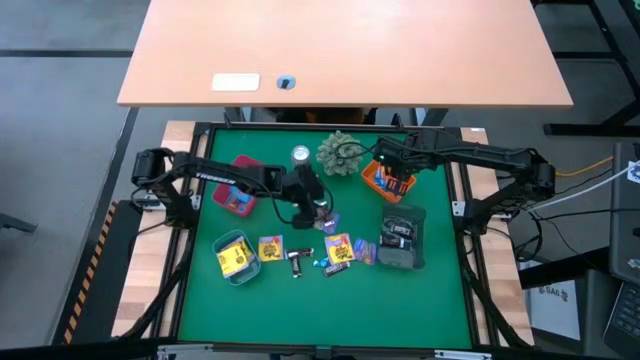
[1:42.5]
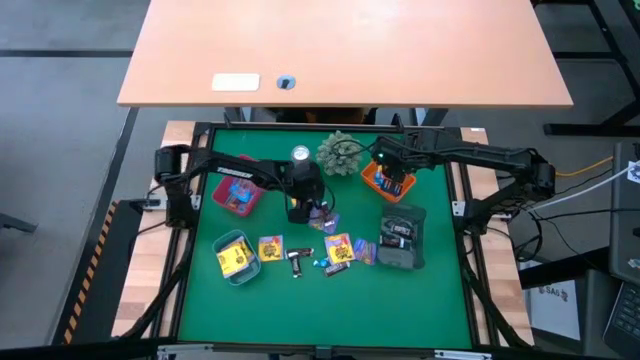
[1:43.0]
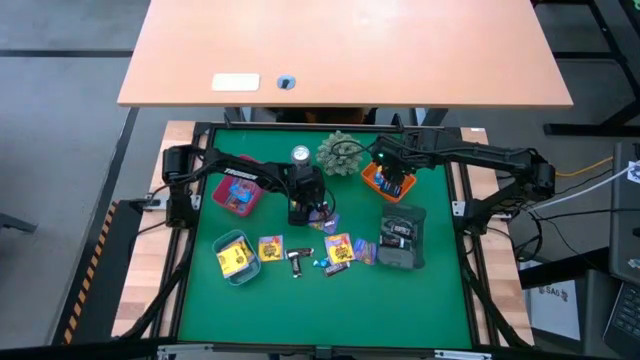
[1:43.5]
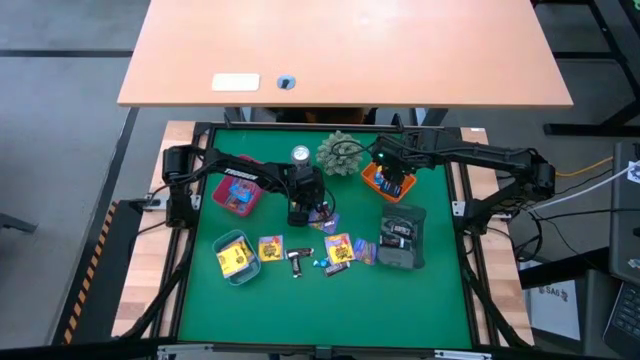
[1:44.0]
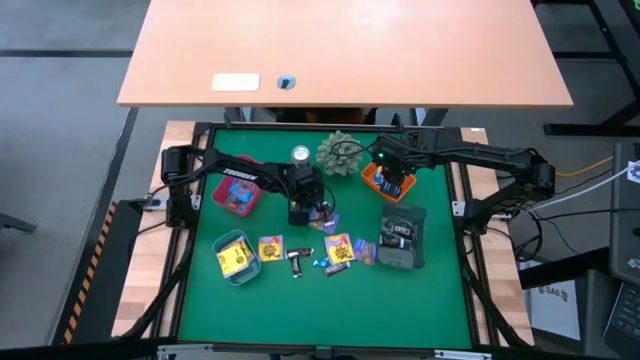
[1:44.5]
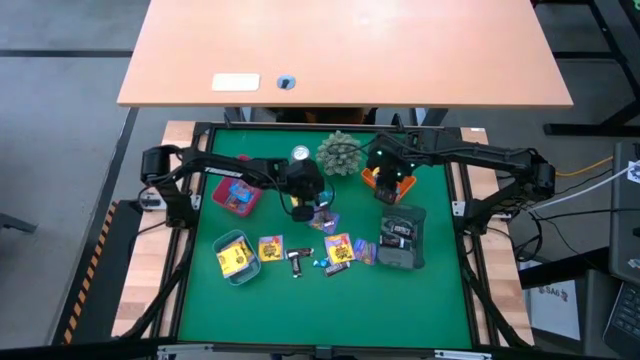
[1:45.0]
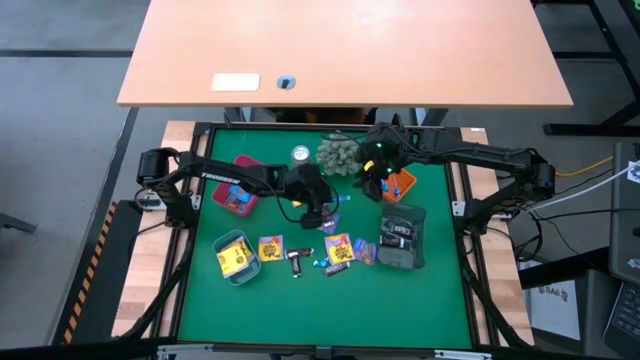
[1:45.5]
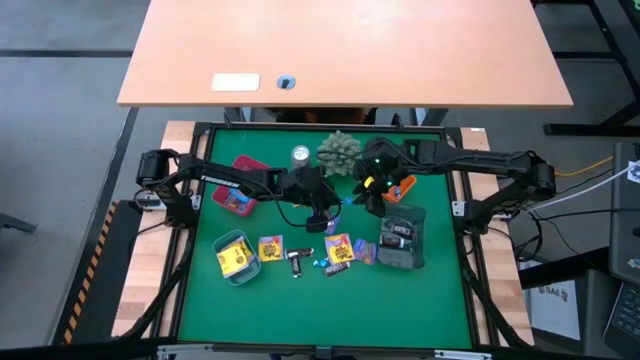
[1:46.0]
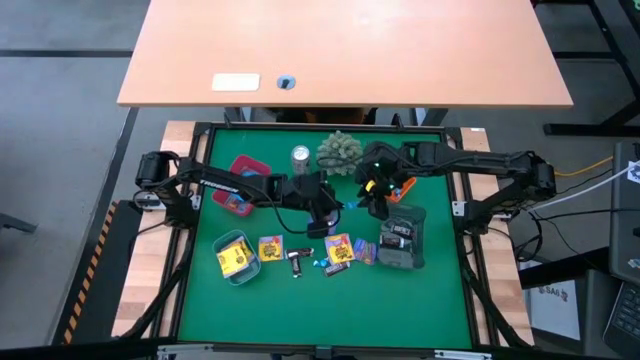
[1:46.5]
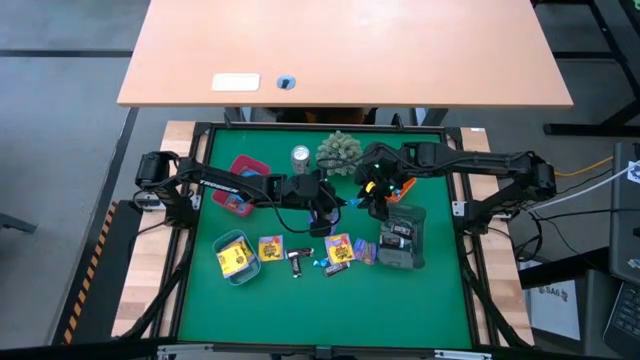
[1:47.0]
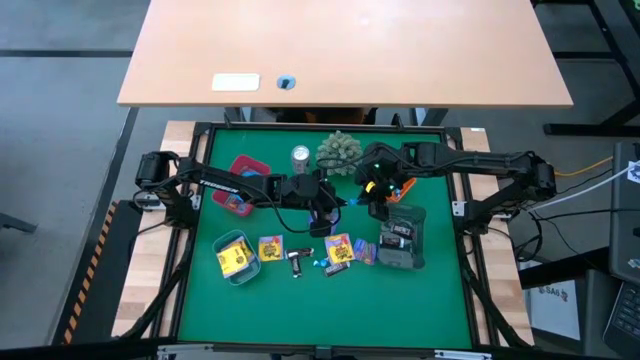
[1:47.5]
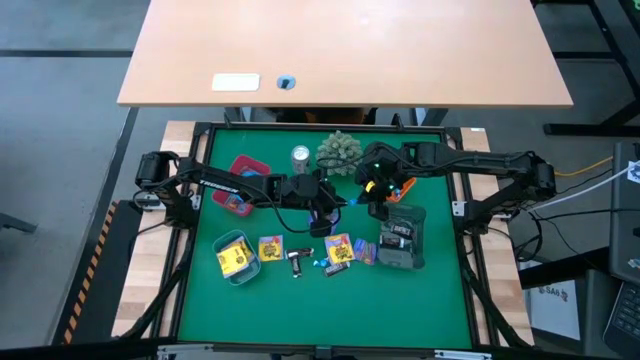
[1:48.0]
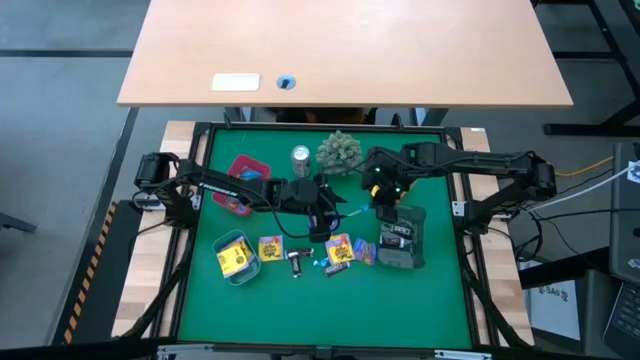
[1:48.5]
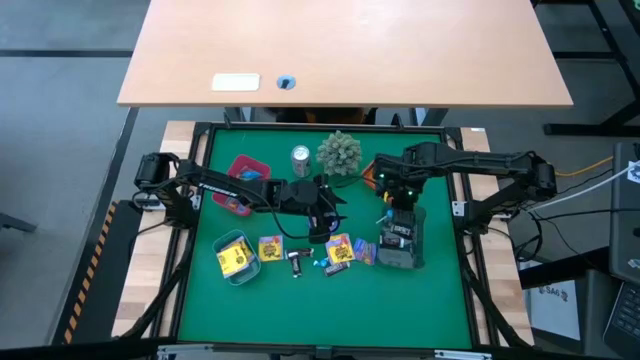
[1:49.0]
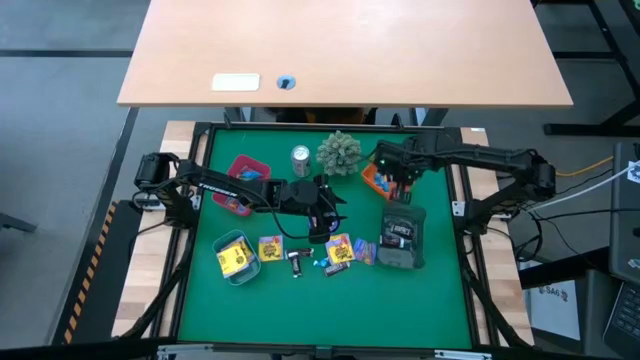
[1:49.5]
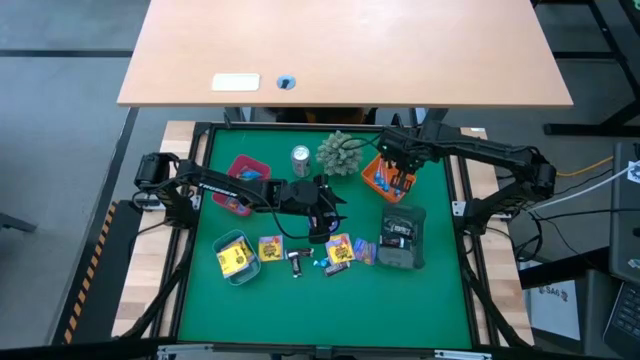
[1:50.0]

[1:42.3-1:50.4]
Task: Sort candy
Put the blue candy into the orange bin

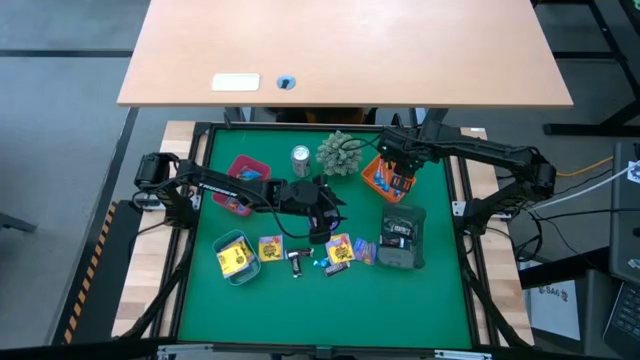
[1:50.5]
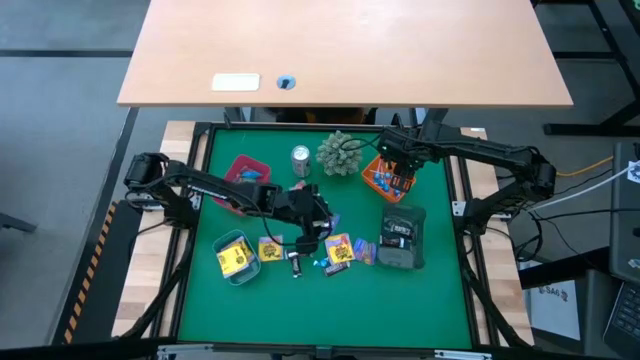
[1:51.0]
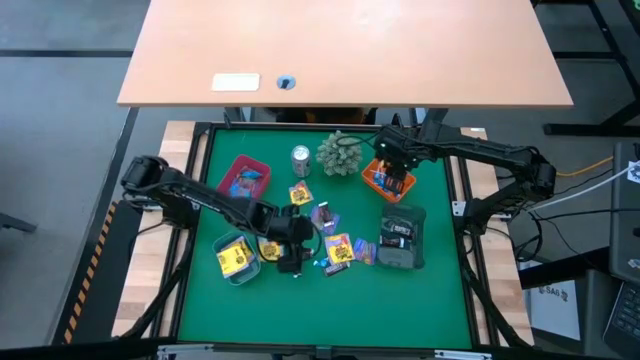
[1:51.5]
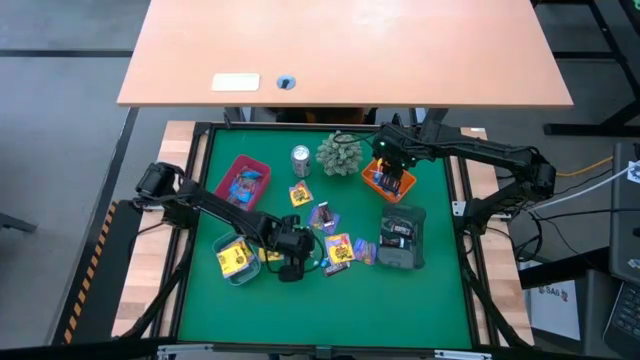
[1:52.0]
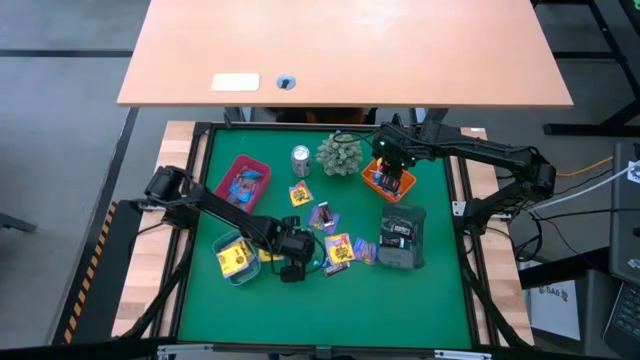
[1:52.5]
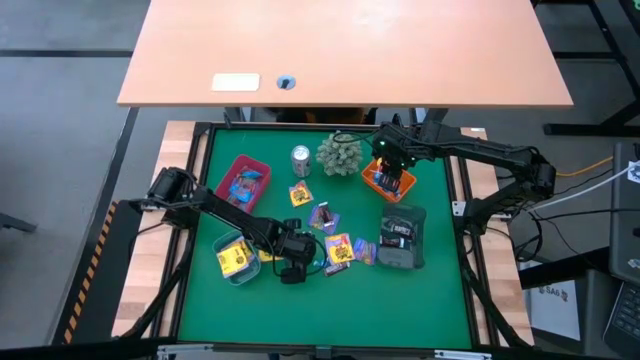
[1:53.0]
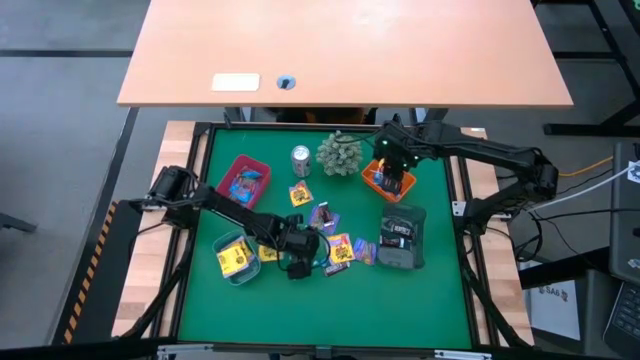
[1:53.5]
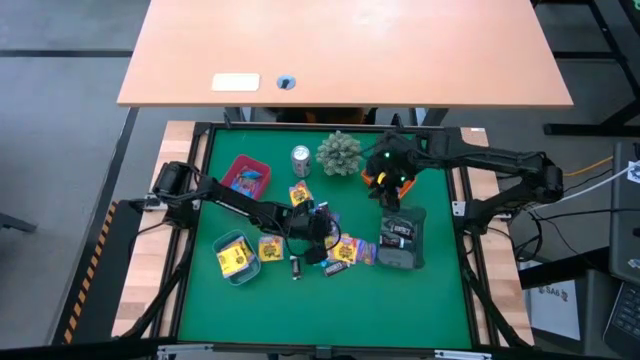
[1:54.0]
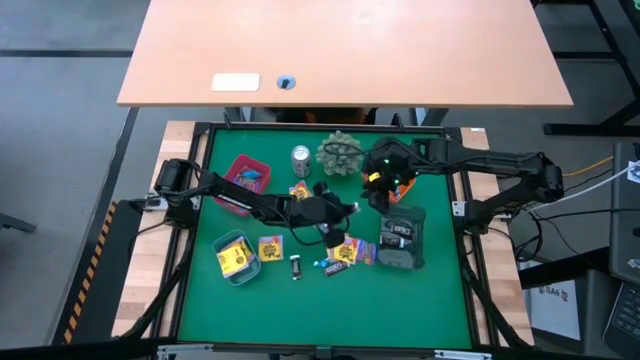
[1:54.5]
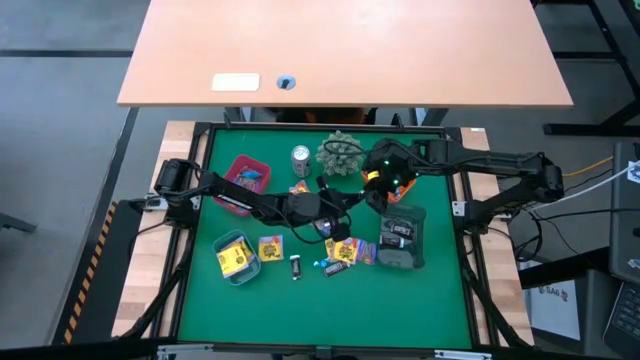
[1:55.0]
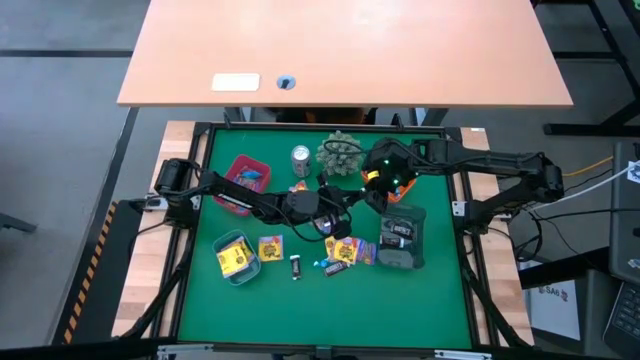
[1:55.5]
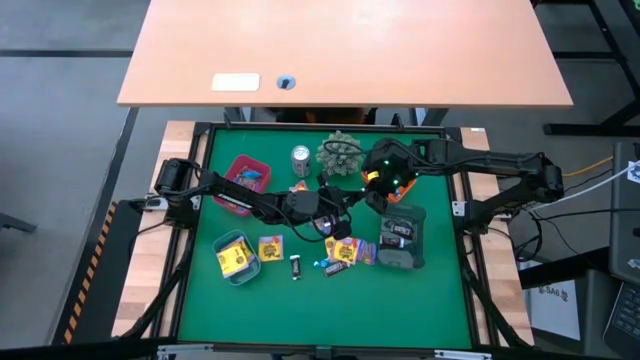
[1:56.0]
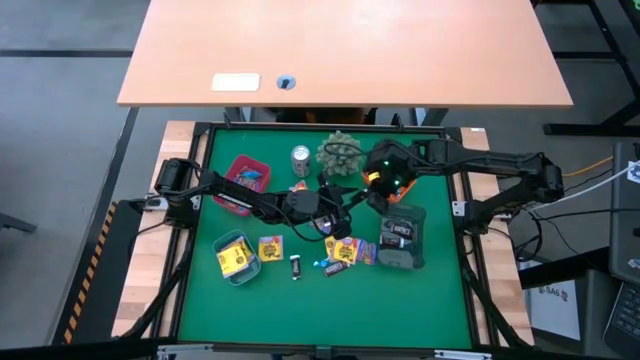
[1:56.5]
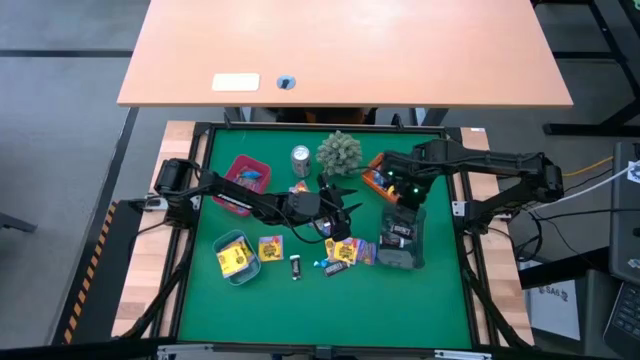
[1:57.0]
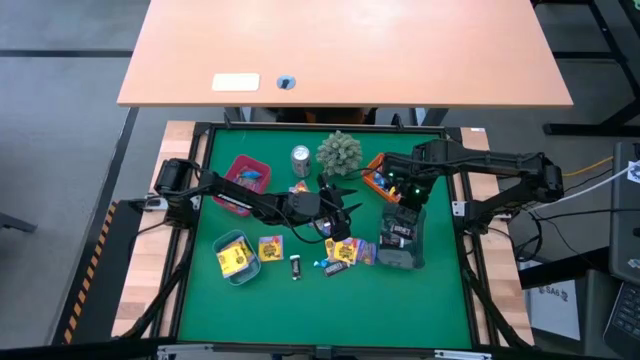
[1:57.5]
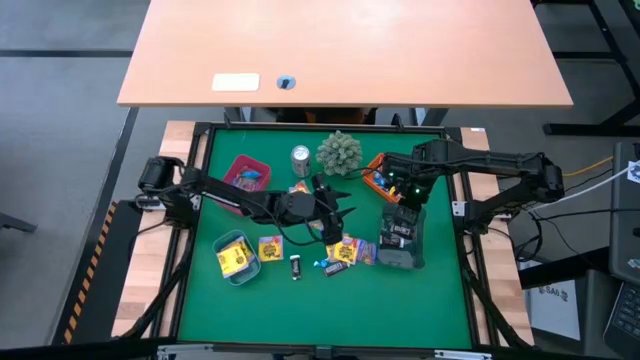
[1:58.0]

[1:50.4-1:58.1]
Put the brown chocolate candy into the black bin

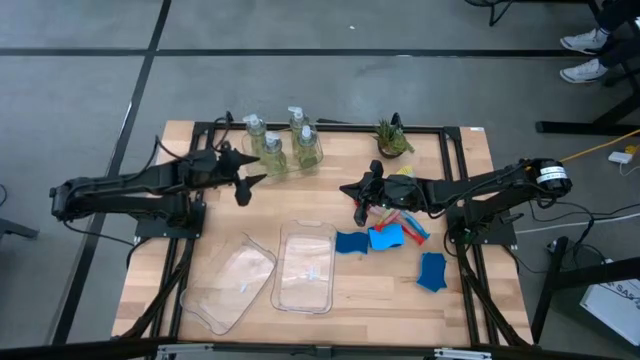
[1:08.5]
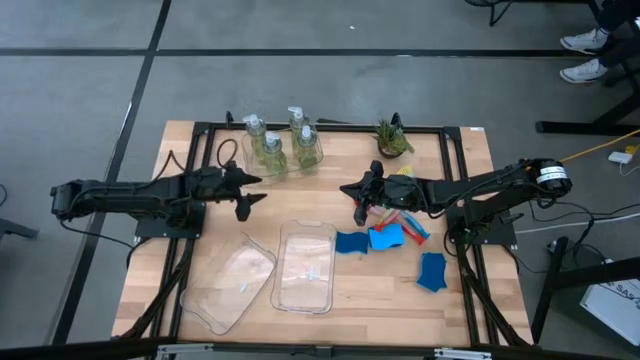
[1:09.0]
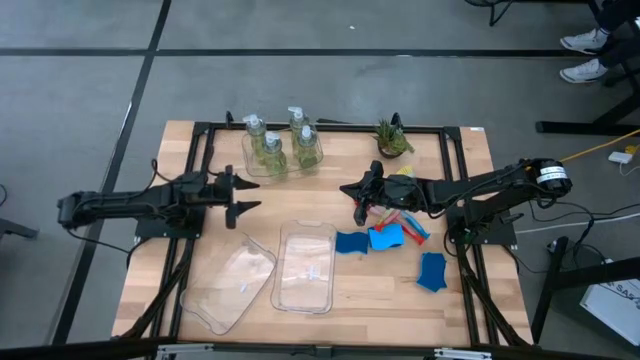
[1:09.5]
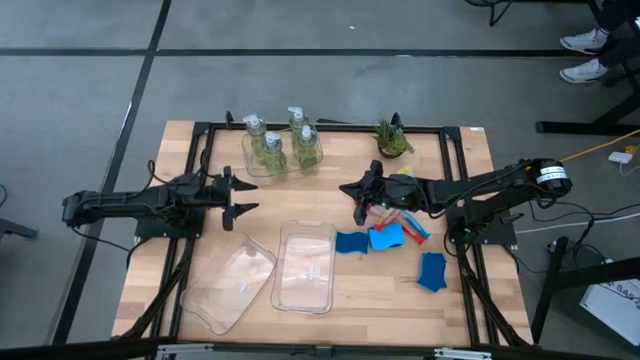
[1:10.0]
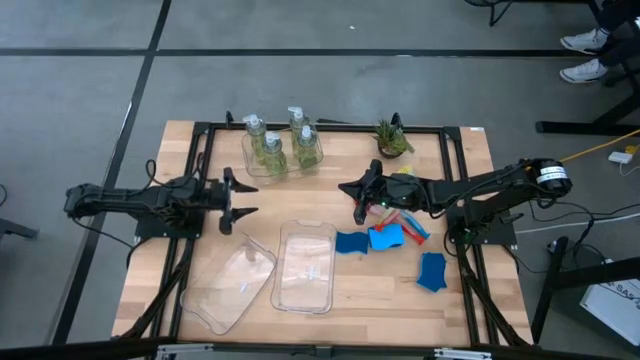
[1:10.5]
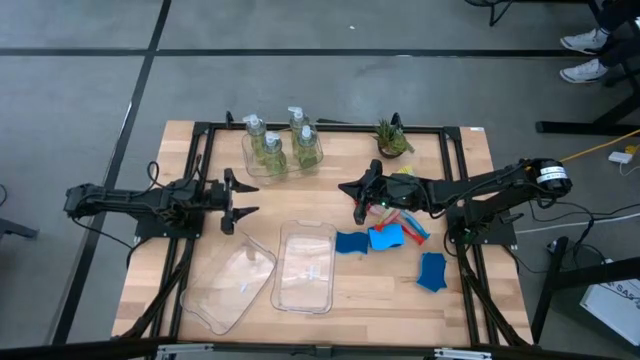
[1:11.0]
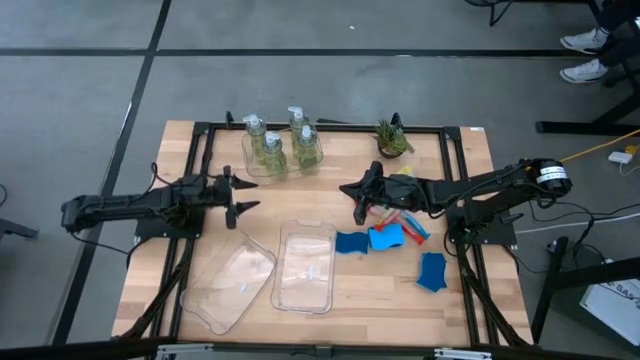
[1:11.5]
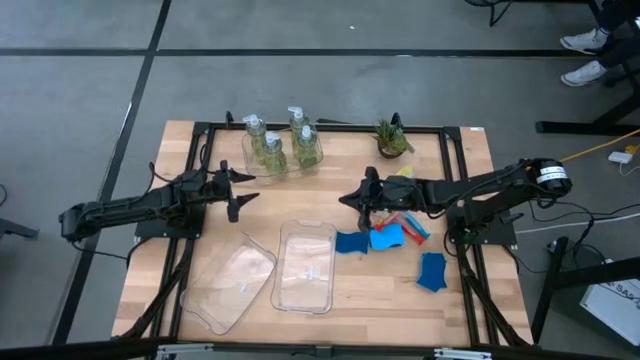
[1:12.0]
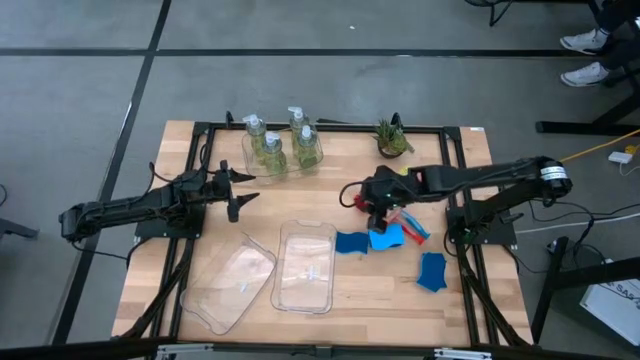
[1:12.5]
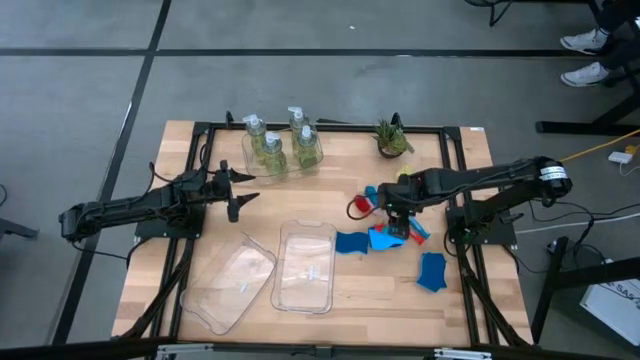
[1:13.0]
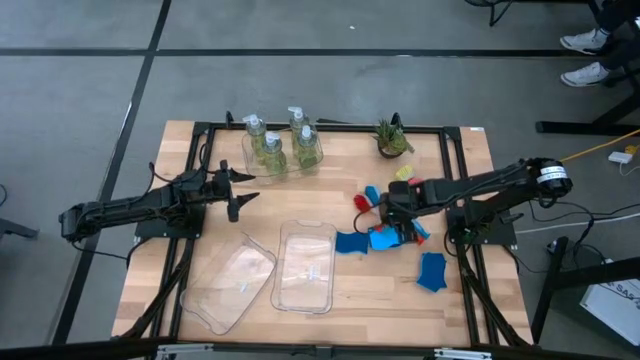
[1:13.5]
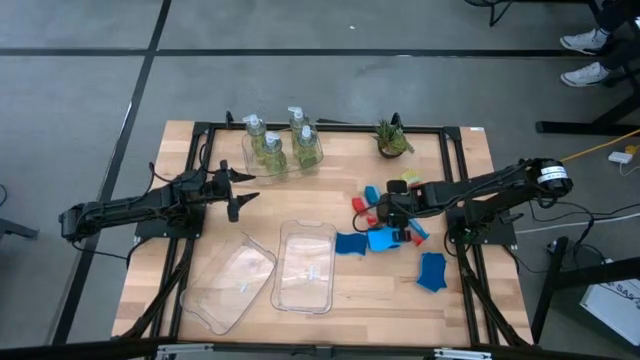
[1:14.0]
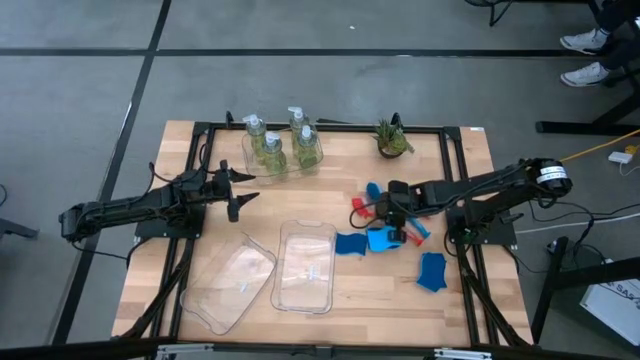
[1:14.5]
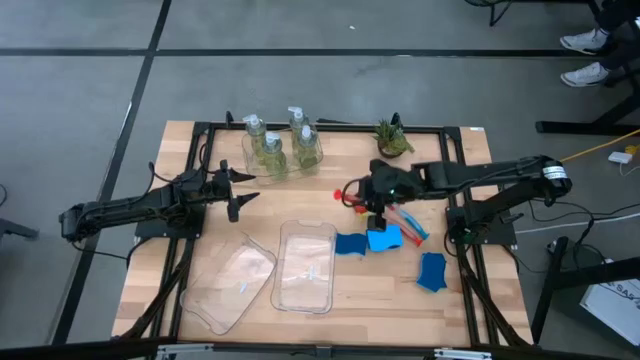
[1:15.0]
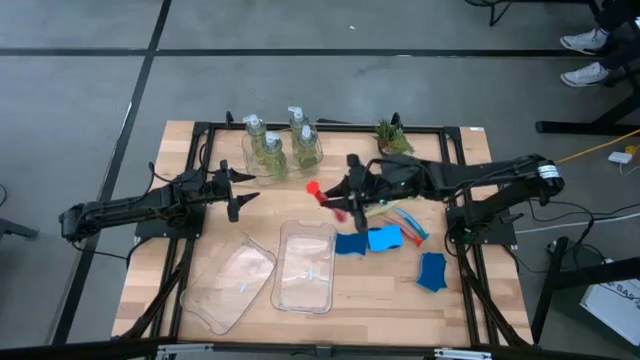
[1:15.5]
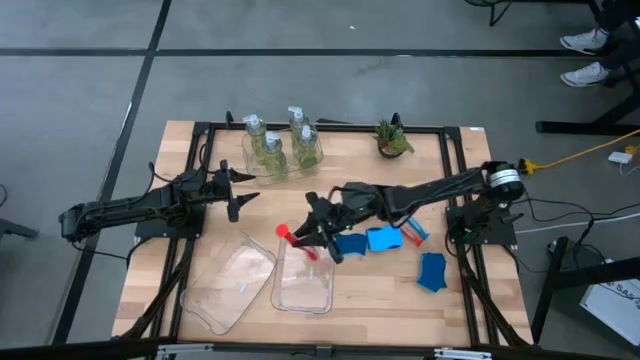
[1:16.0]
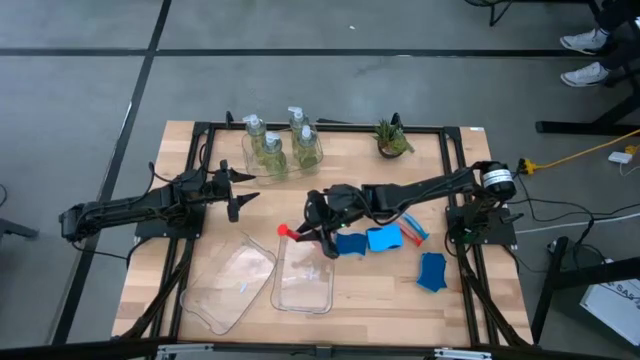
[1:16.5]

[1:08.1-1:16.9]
Task: Pick & Place Kitchen Sink Supplies
Put the orange dish brush into the right transparent bin
